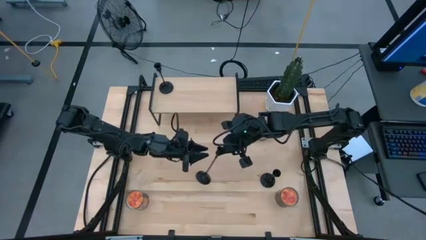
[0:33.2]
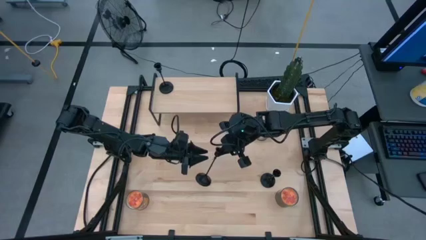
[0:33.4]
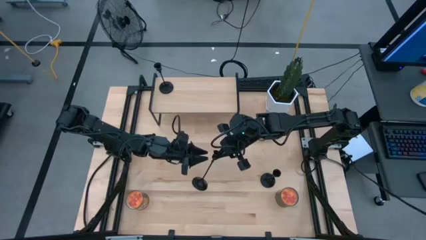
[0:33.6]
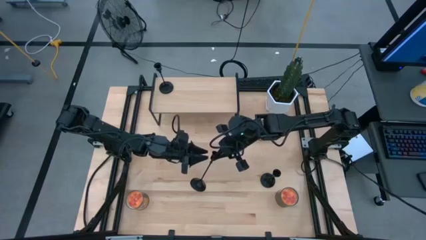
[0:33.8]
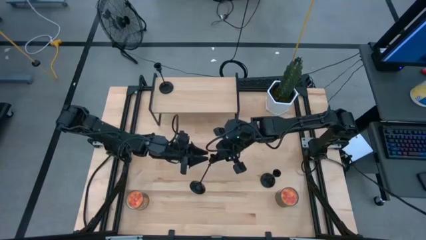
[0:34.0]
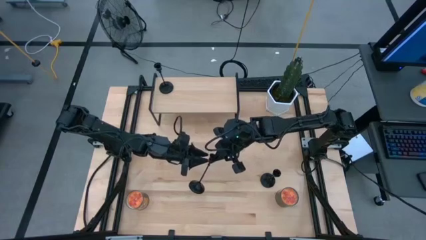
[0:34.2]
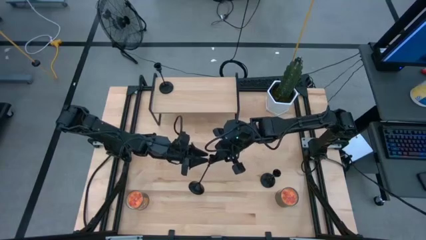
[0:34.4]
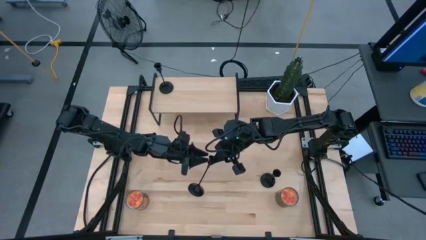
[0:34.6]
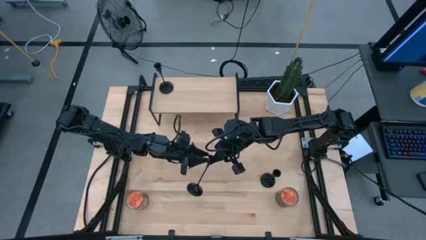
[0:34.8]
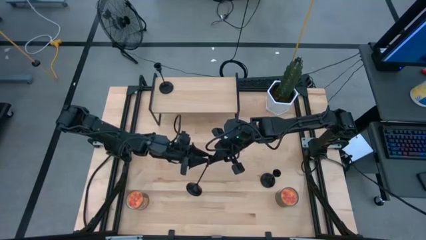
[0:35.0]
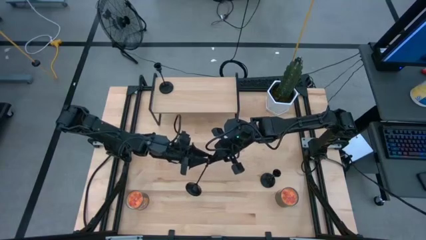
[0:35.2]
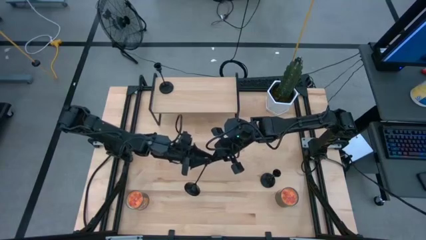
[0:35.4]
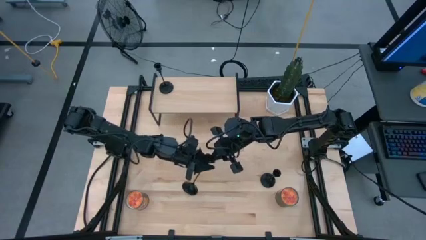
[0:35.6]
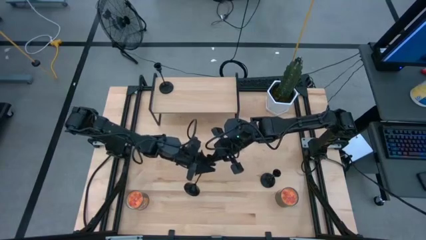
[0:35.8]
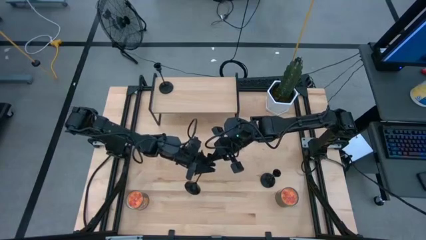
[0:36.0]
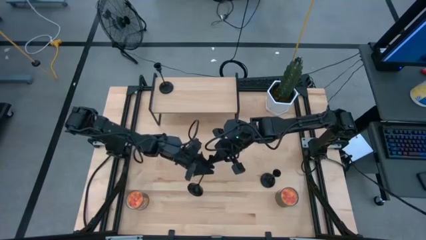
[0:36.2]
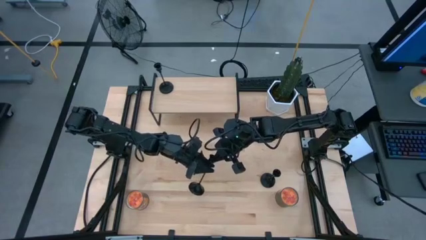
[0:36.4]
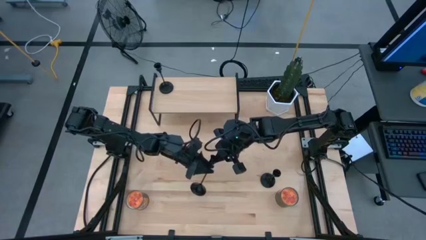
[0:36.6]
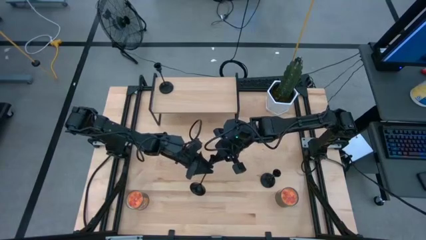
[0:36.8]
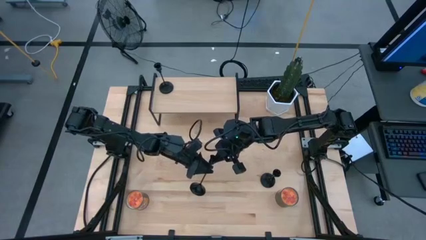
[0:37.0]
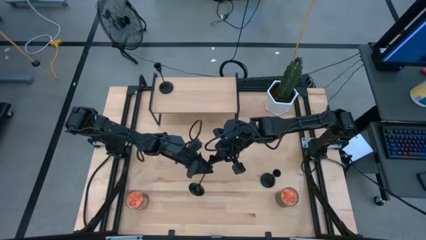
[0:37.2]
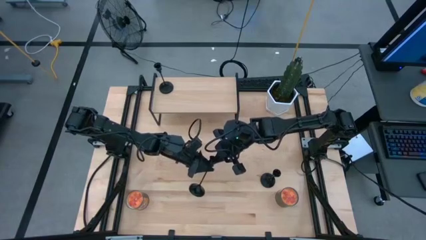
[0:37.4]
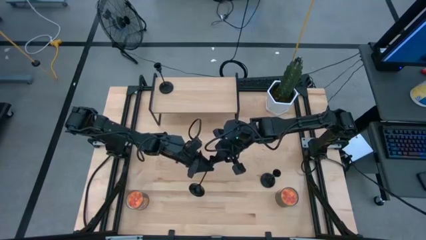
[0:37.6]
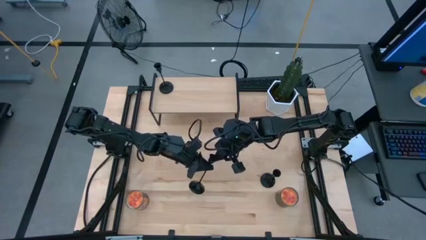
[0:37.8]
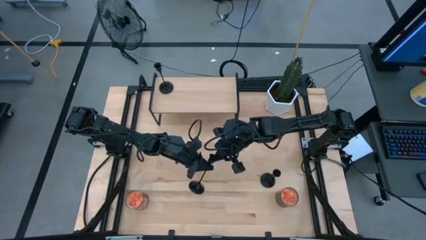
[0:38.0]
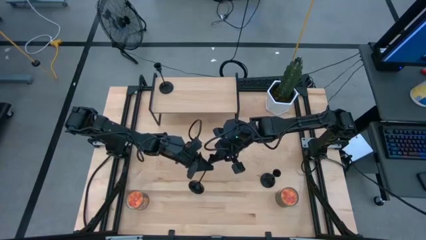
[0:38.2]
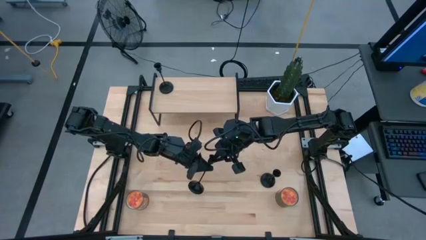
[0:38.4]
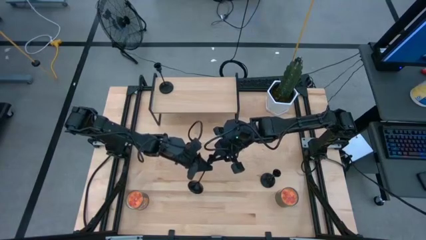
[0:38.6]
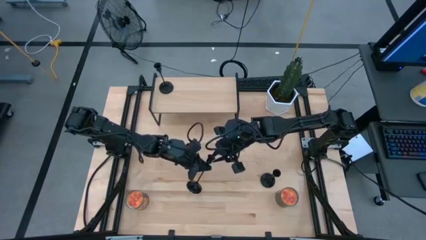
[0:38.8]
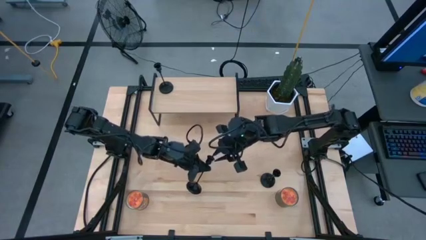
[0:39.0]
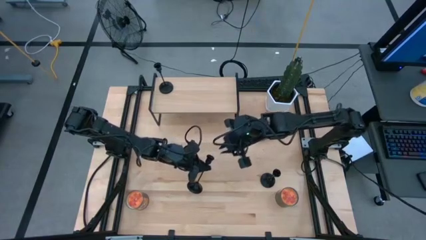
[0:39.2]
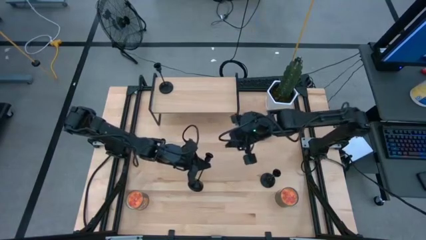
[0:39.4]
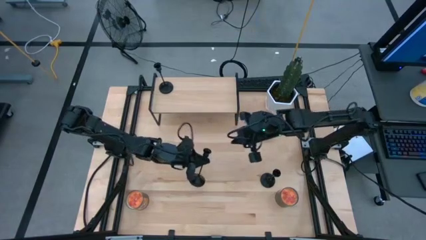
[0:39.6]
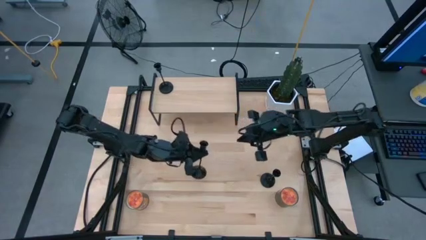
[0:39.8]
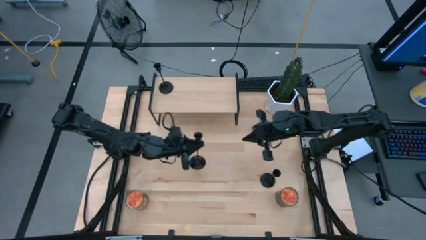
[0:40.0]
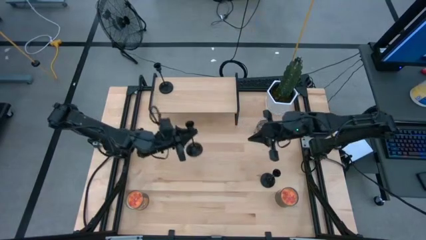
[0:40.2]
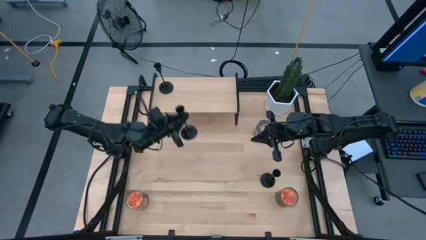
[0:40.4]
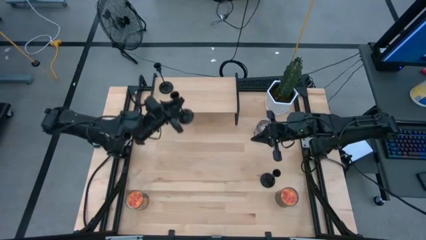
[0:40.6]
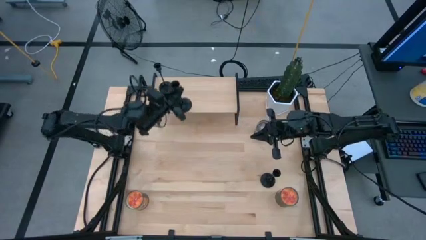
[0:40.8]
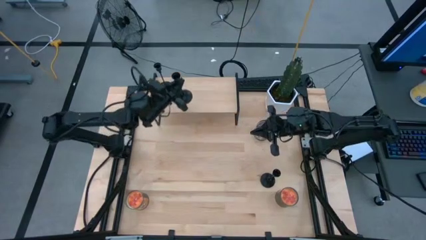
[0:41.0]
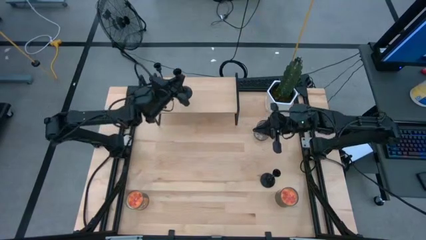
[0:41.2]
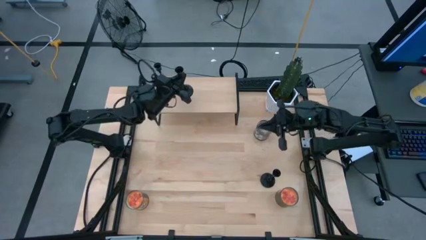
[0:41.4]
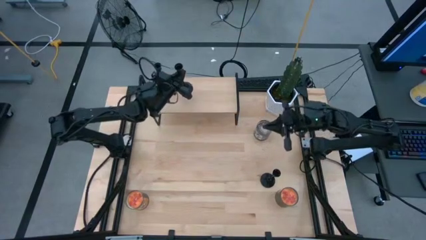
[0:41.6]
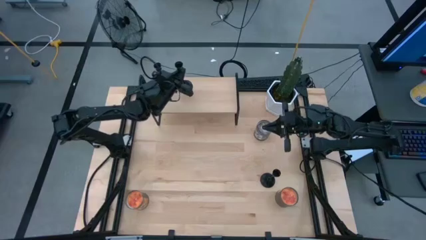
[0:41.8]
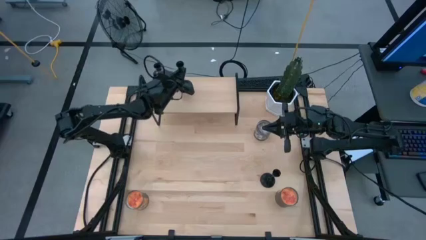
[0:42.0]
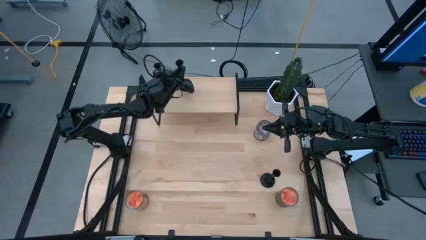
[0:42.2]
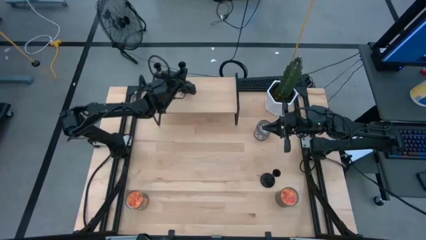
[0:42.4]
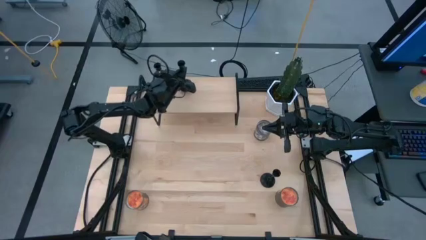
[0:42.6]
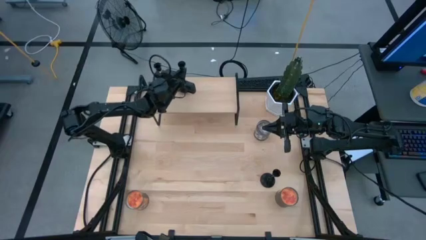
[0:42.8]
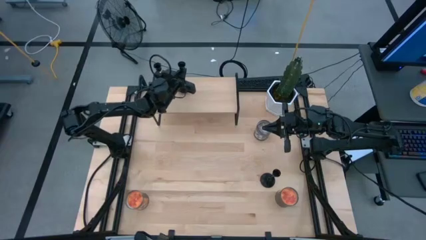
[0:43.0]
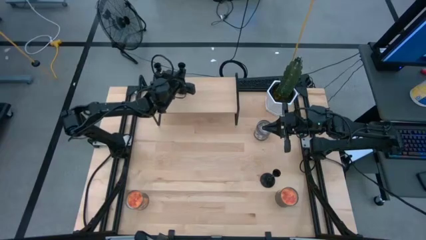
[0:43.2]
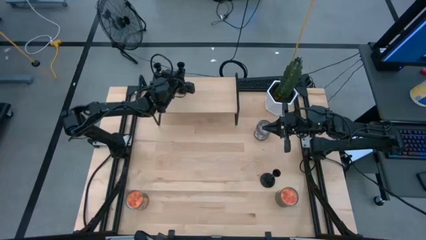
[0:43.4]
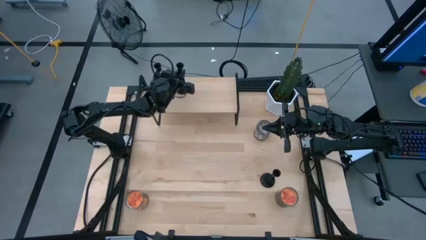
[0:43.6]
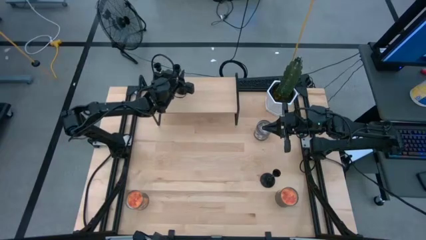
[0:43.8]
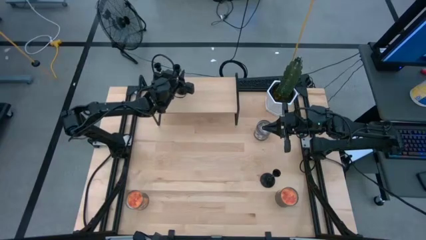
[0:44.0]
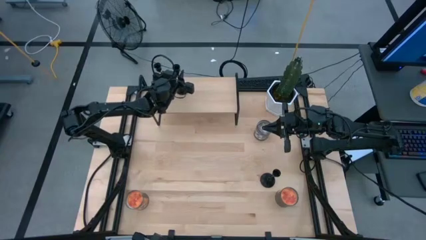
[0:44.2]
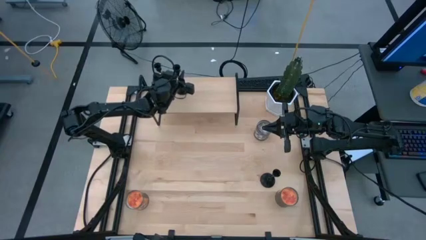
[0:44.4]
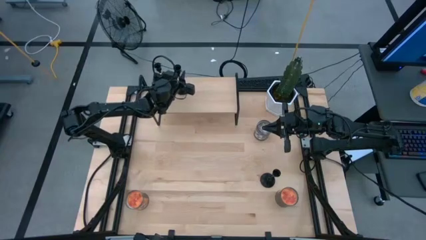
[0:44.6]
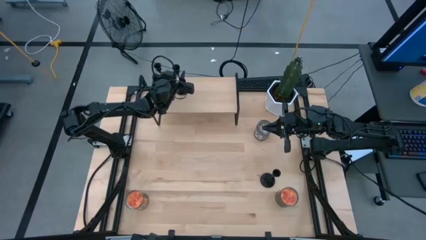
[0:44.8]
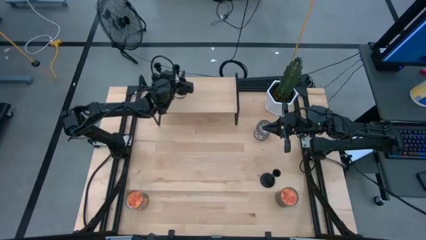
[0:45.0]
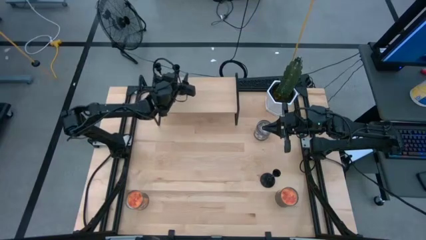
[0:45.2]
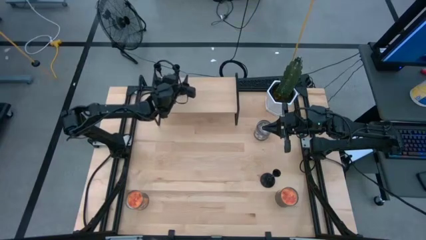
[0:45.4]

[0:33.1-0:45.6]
Task: Pick & Place candle stick holders
Put the top black candle holder on the shelf
